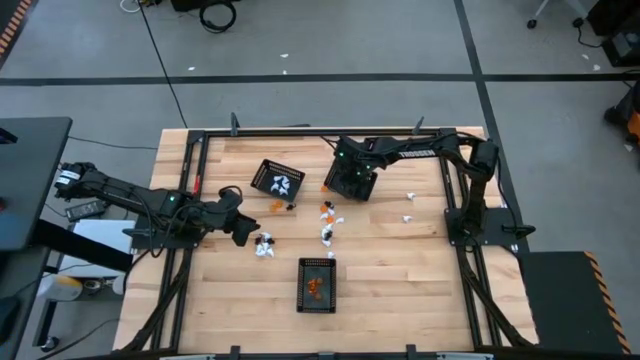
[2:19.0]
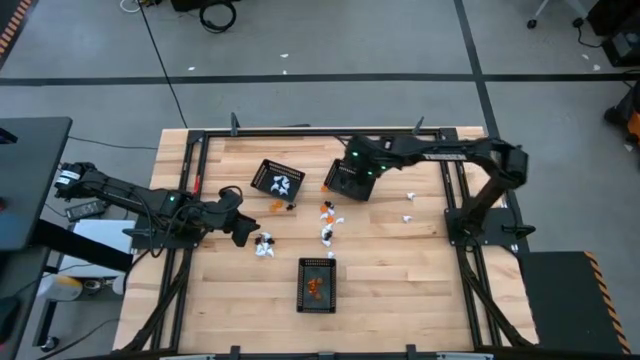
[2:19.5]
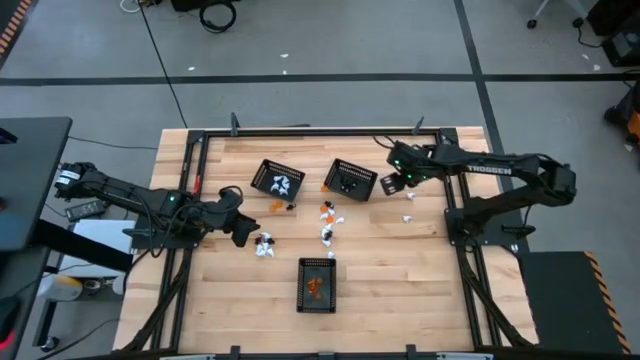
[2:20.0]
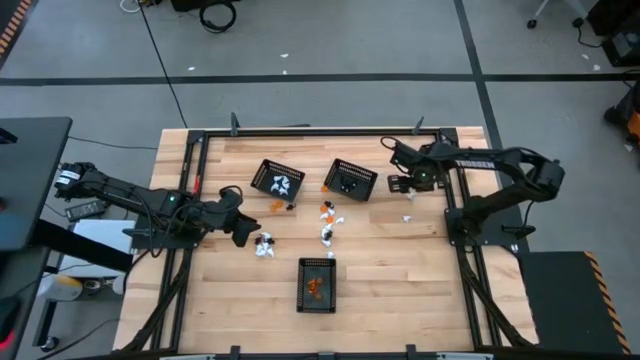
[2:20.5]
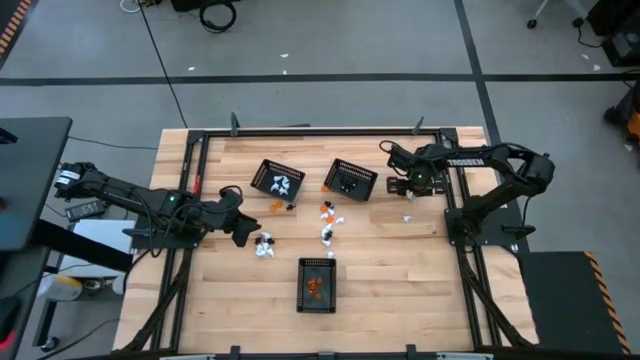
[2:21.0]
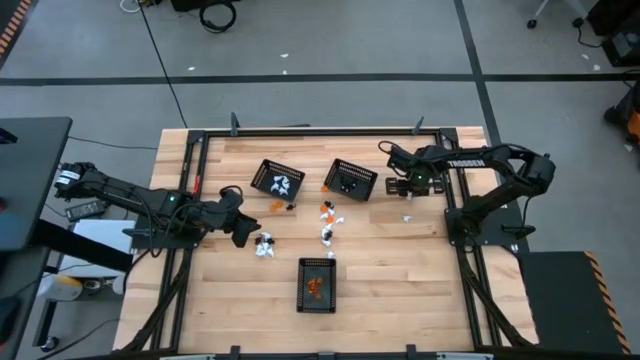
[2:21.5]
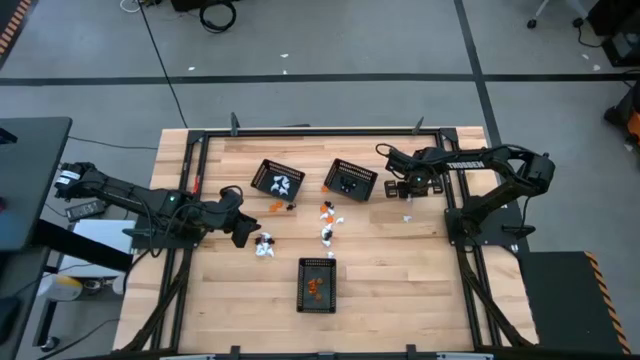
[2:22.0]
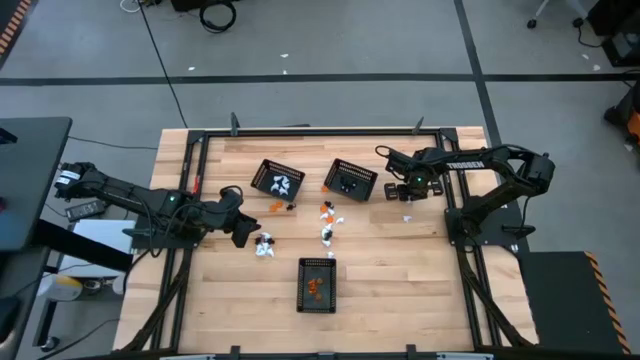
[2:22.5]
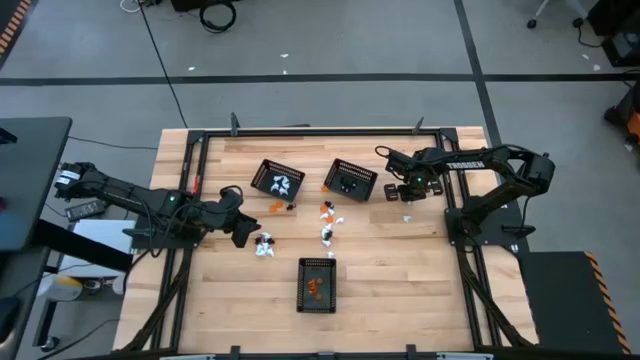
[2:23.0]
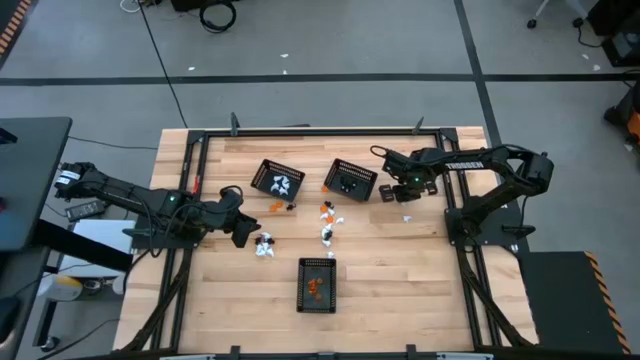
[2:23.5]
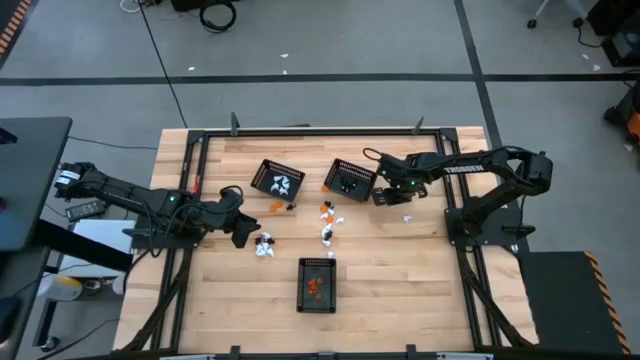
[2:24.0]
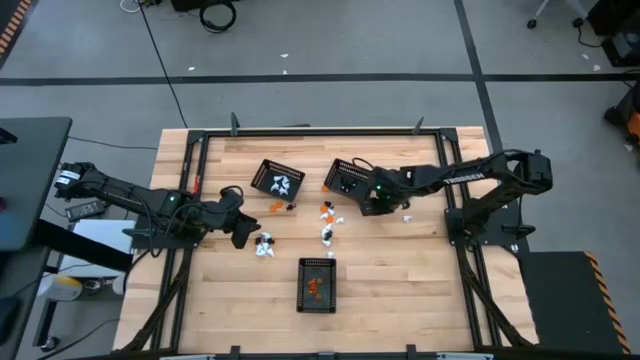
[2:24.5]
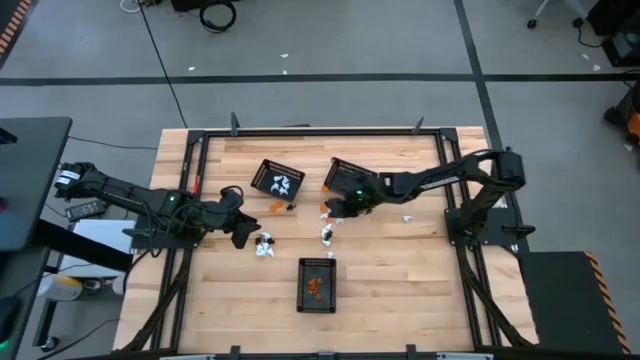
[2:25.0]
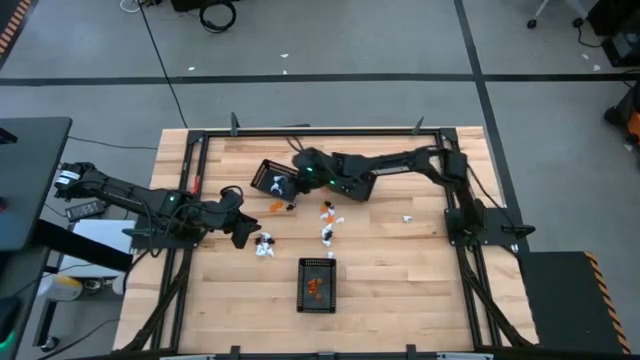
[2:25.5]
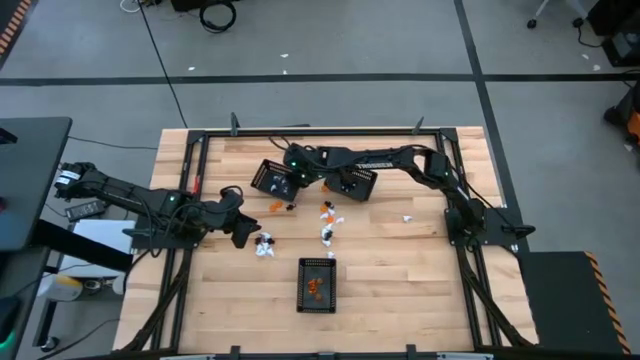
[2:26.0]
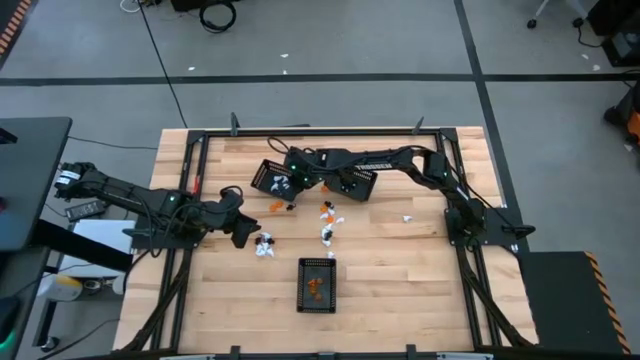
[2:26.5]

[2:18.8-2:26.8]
Task: Sort Halloween decoration
Put the white ghost toy into the top left black basket

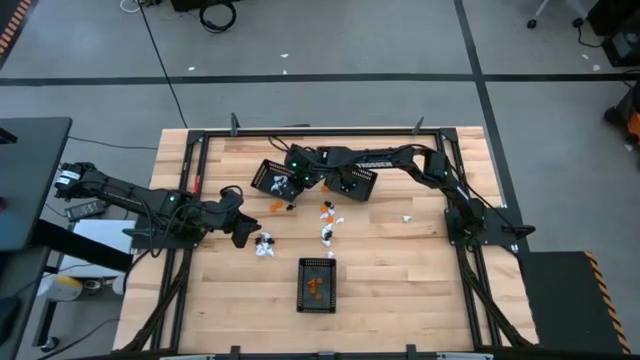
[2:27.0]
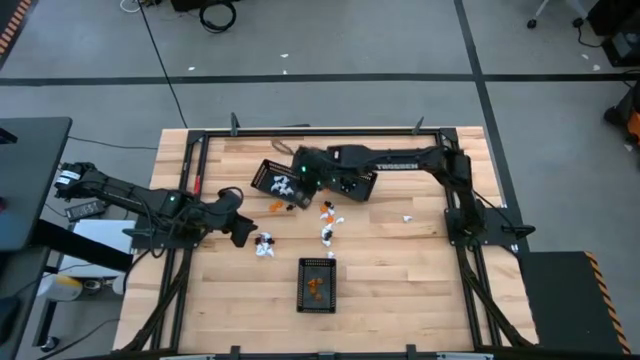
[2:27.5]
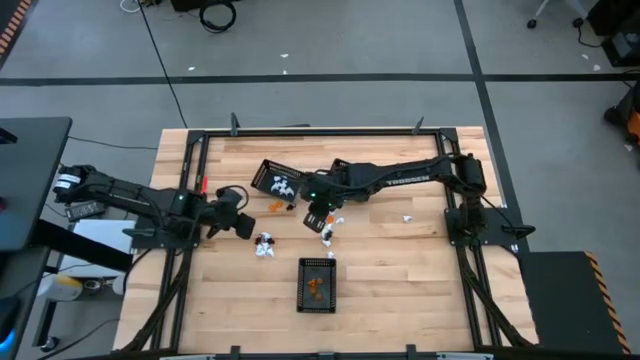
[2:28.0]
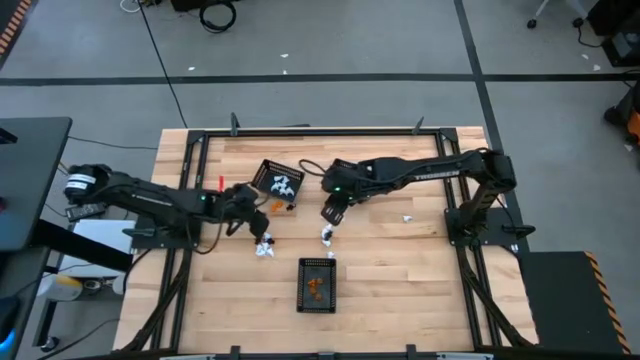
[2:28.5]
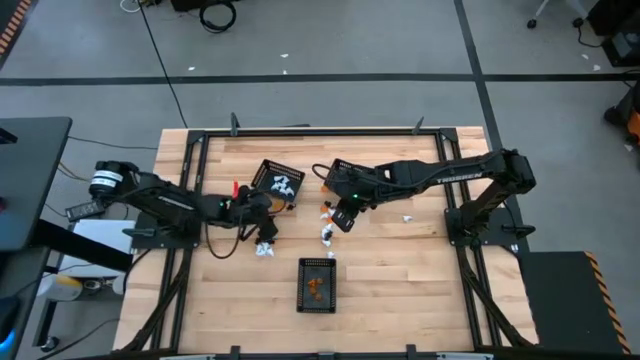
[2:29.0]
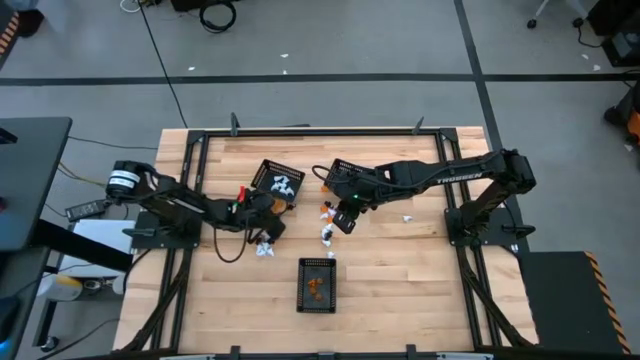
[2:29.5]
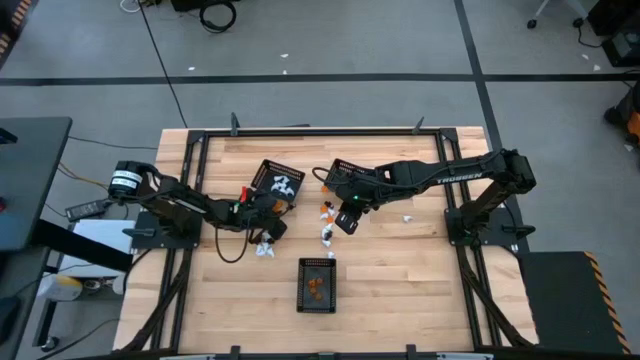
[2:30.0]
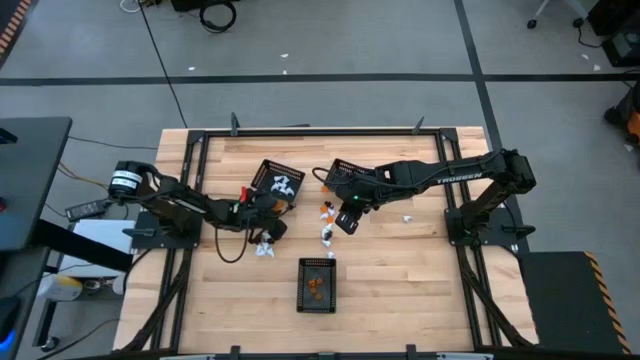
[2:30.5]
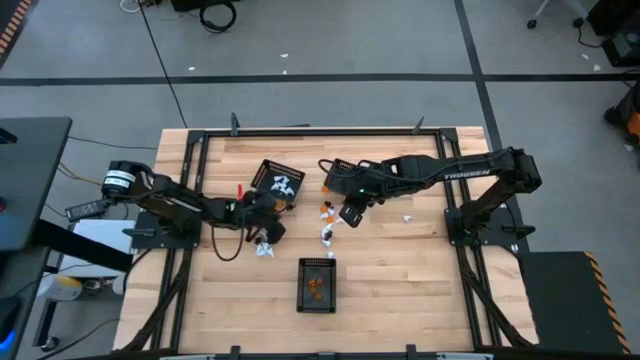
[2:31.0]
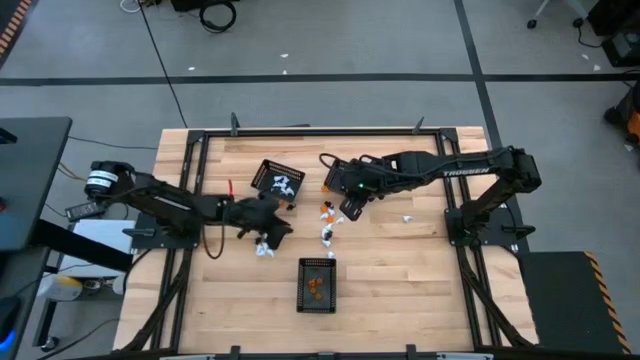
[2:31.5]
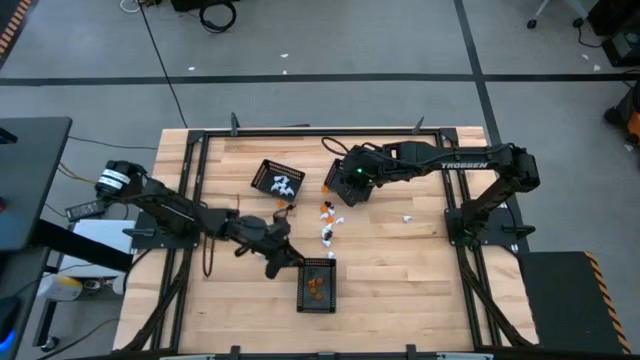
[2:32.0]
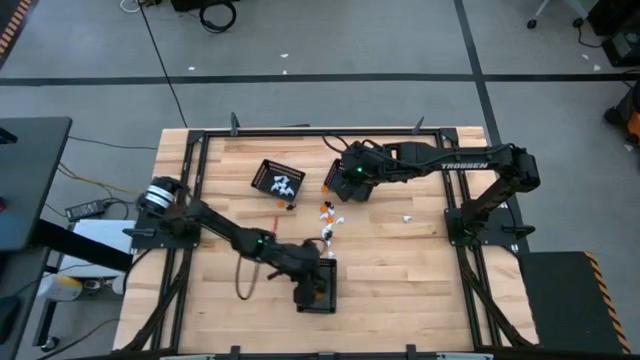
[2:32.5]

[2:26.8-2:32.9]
Put the orange pumpkin toy into the bottom black basket

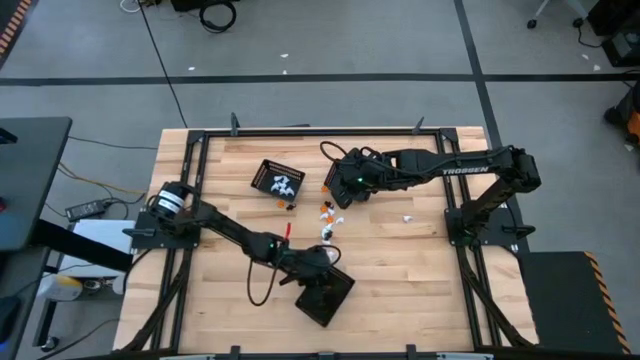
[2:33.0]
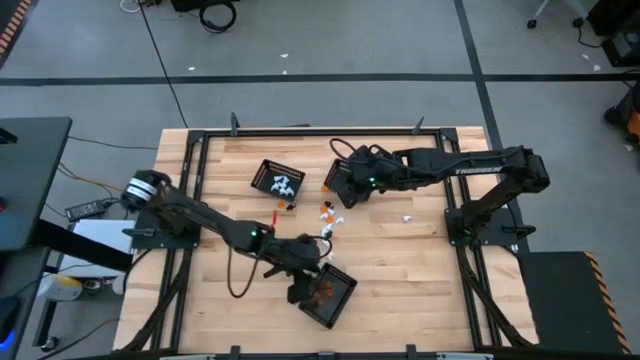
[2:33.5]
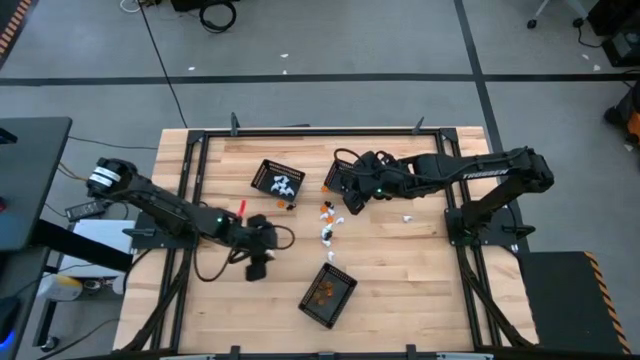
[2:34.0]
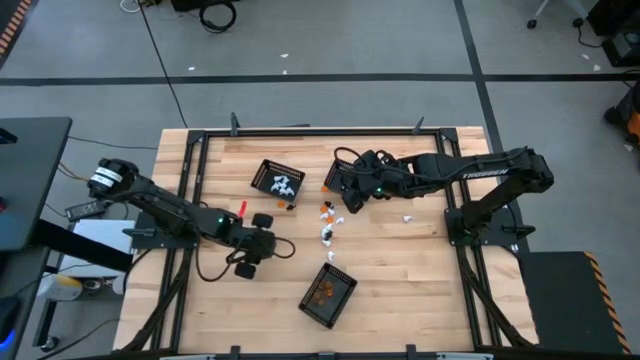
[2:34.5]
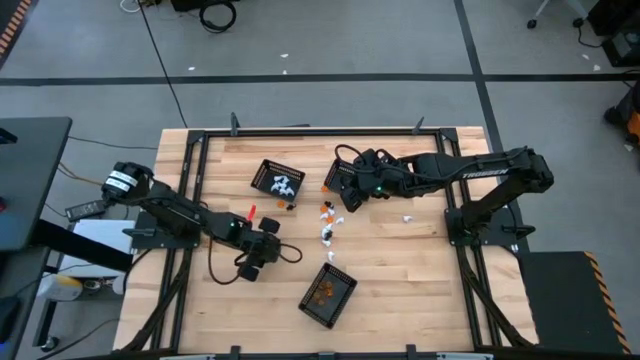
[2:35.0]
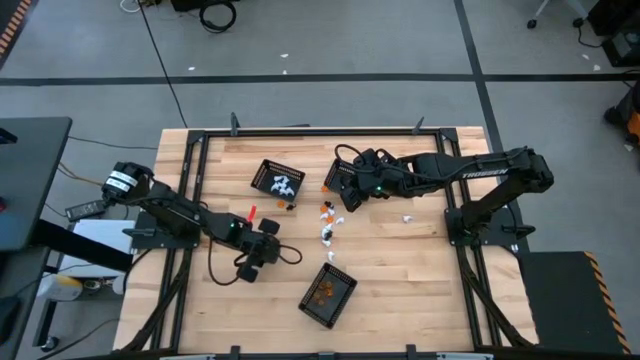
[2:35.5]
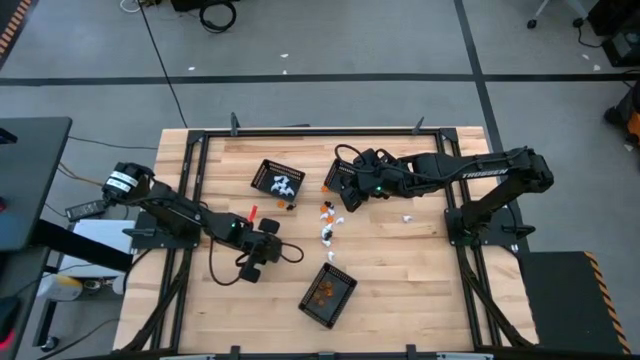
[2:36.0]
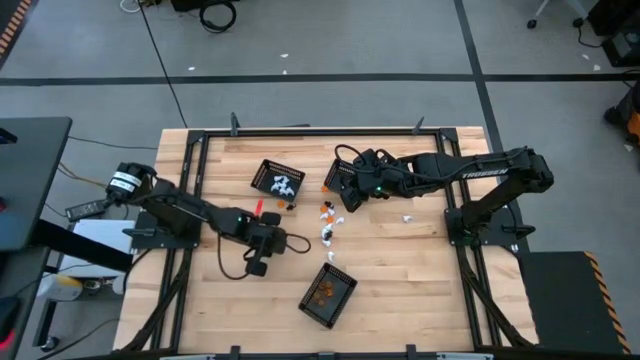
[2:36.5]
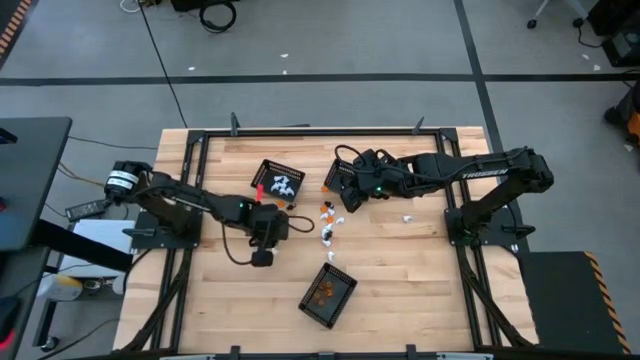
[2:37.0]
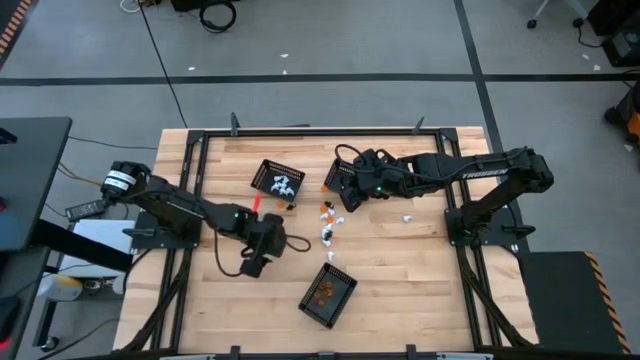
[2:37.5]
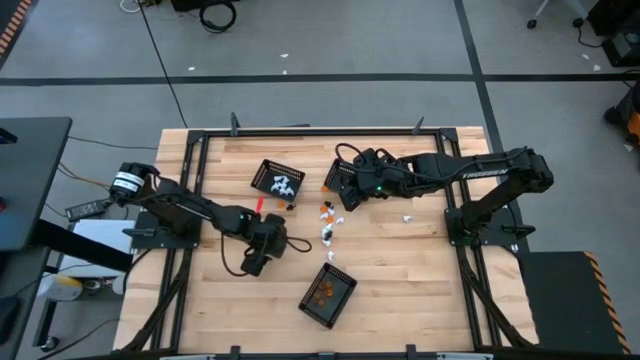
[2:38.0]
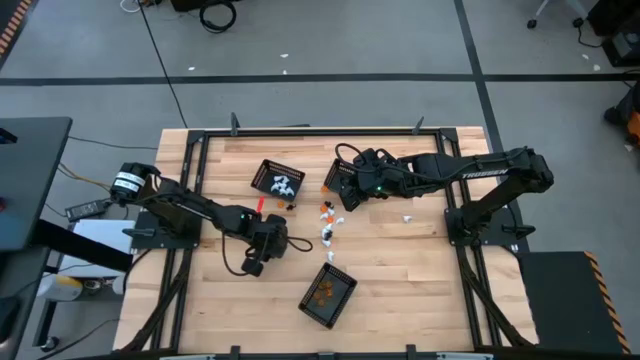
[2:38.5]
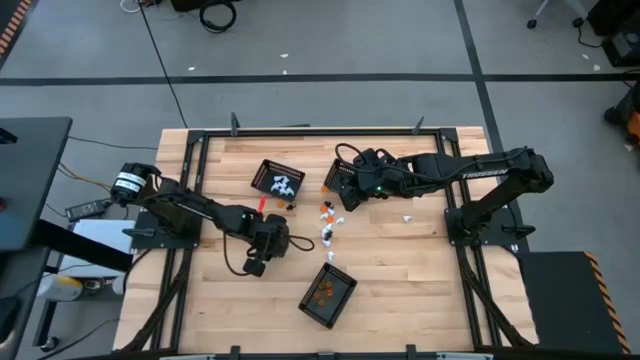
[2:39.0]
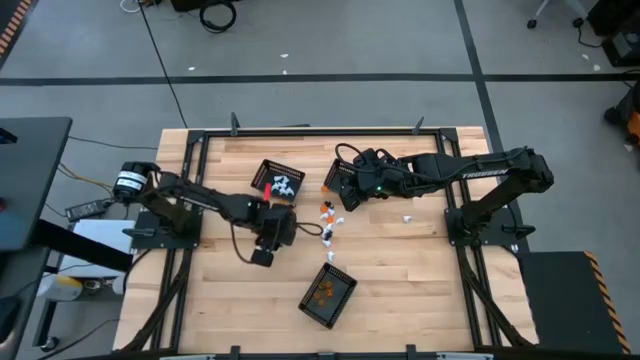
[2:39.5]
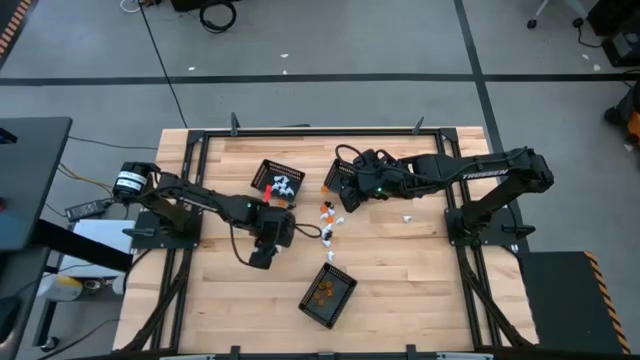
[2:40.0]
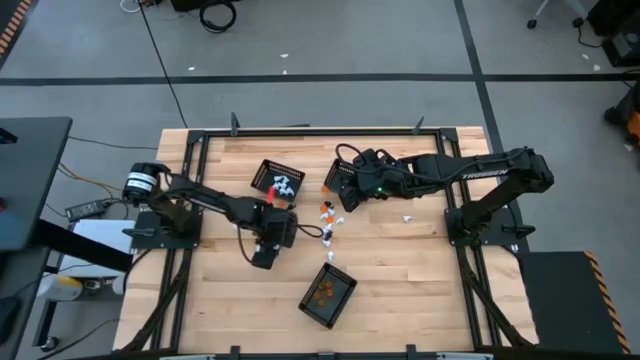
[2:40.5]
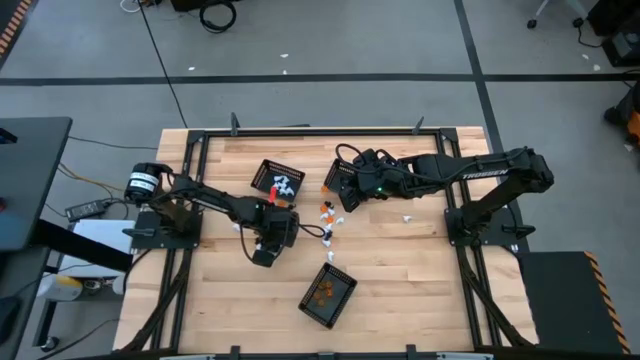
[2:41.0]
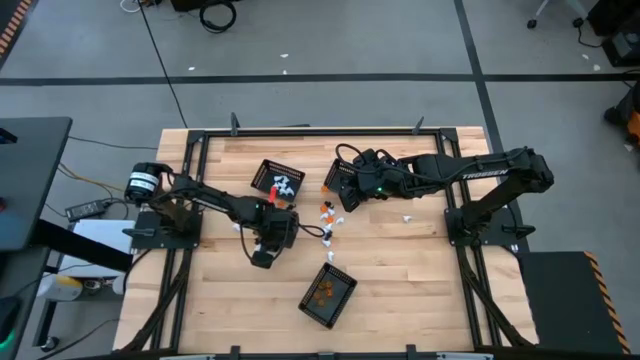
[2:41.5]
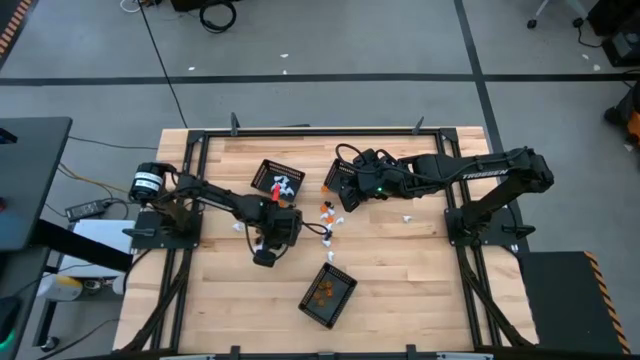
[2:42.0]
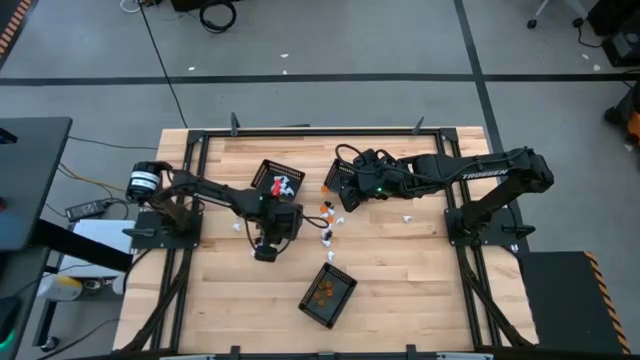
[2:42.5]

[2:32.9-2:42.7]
Put the white ghost toy into the top left black basket
